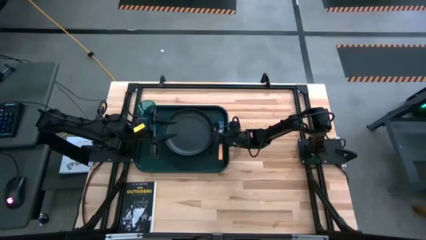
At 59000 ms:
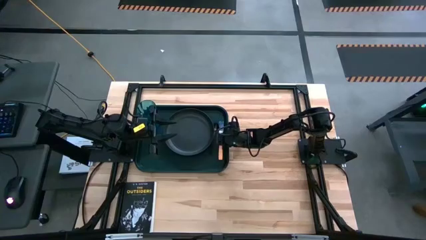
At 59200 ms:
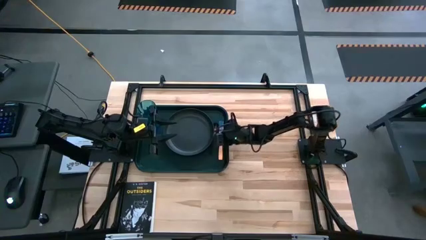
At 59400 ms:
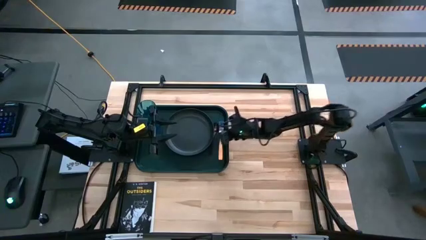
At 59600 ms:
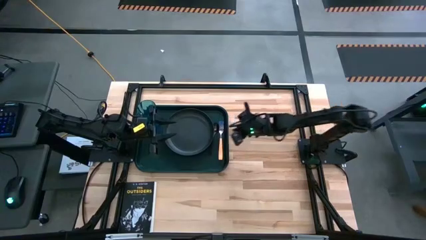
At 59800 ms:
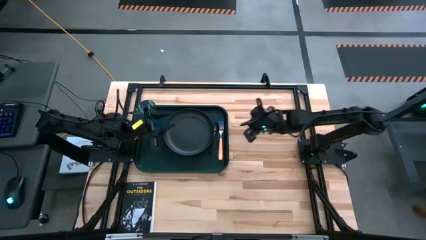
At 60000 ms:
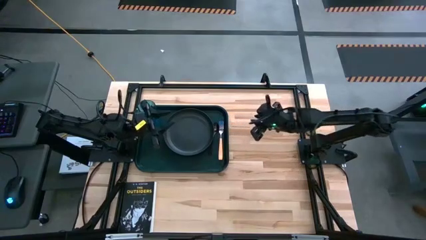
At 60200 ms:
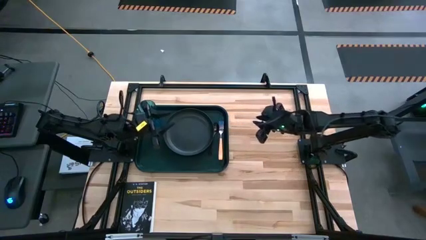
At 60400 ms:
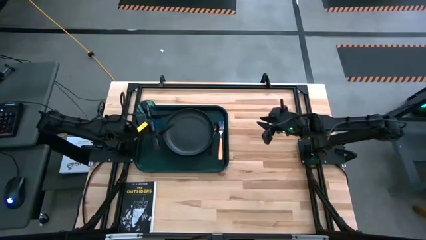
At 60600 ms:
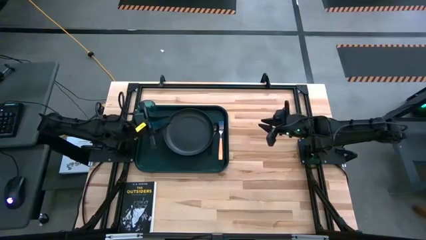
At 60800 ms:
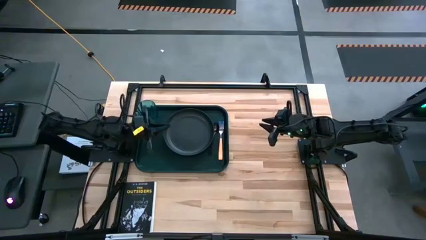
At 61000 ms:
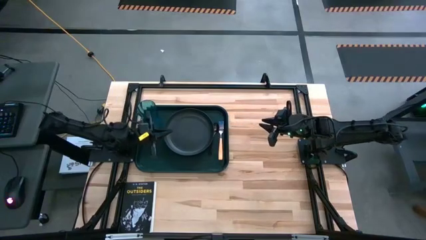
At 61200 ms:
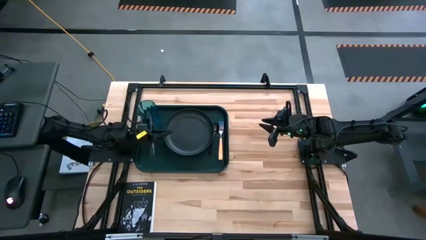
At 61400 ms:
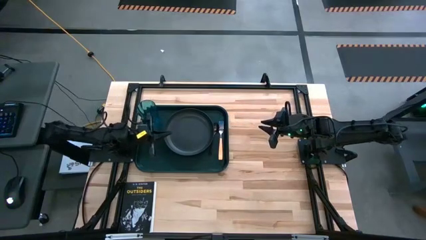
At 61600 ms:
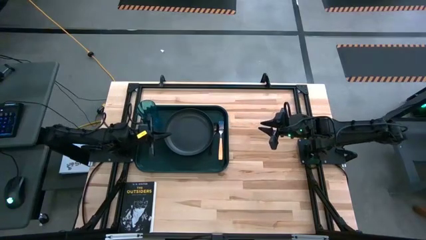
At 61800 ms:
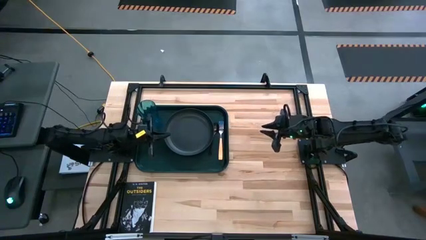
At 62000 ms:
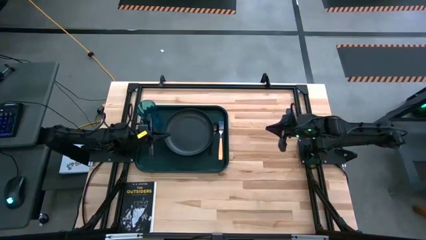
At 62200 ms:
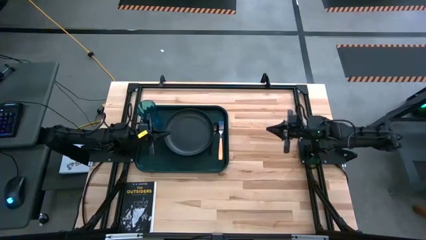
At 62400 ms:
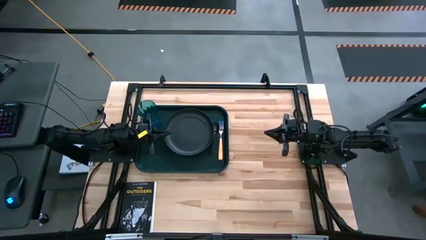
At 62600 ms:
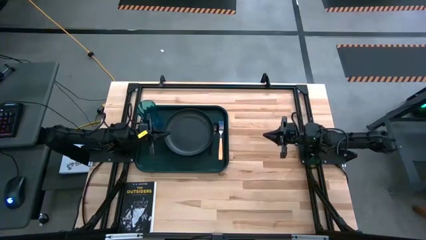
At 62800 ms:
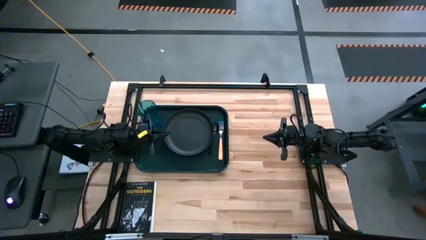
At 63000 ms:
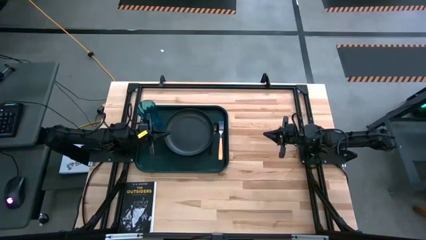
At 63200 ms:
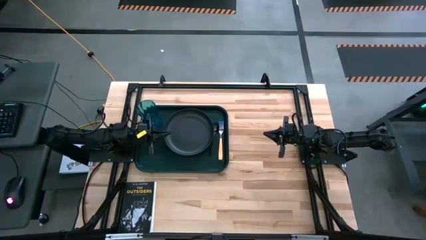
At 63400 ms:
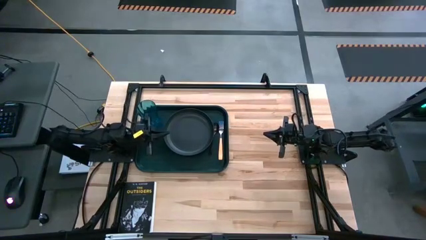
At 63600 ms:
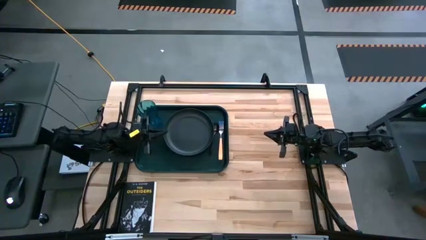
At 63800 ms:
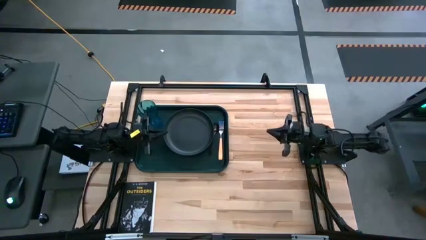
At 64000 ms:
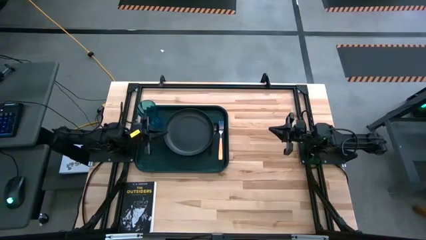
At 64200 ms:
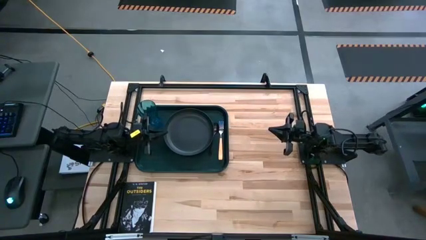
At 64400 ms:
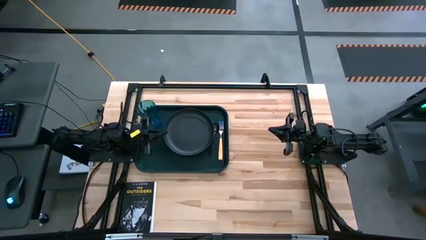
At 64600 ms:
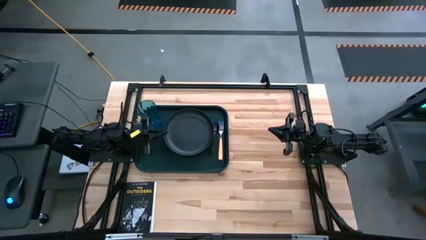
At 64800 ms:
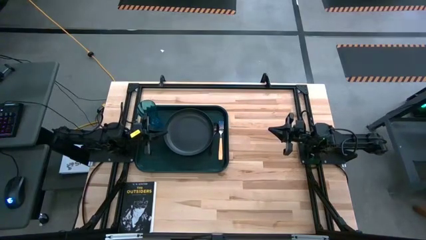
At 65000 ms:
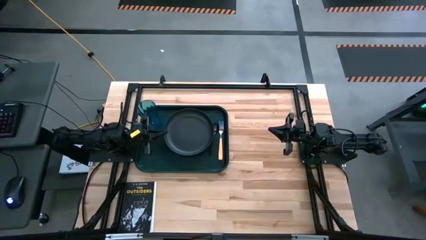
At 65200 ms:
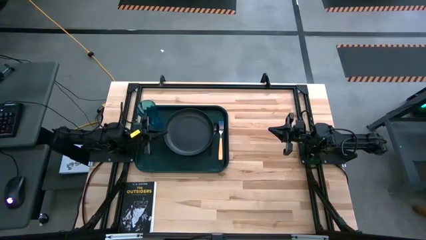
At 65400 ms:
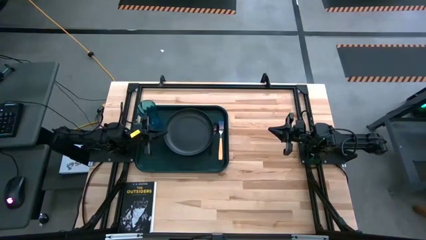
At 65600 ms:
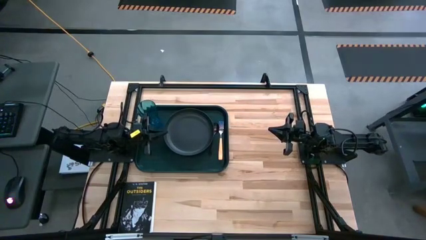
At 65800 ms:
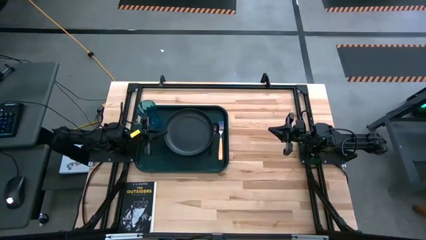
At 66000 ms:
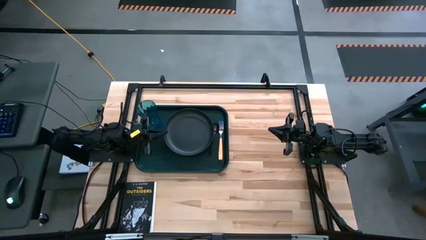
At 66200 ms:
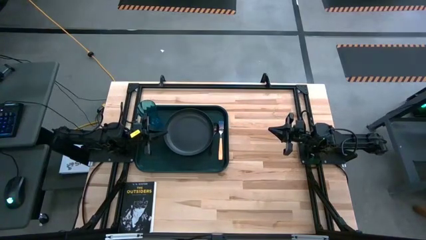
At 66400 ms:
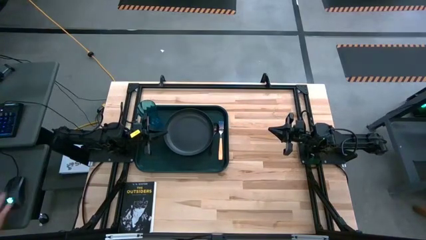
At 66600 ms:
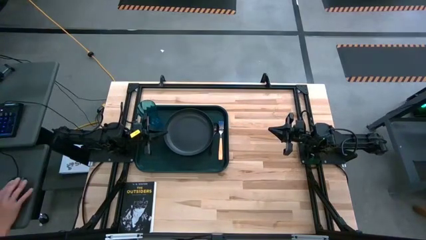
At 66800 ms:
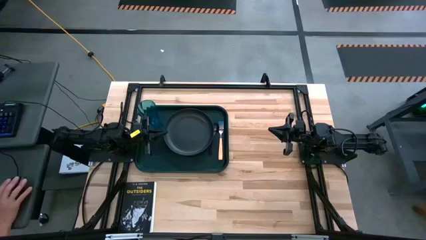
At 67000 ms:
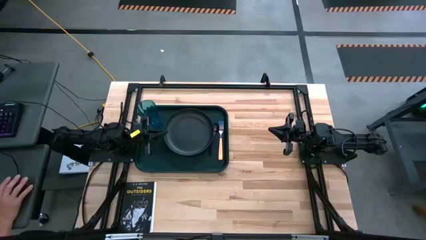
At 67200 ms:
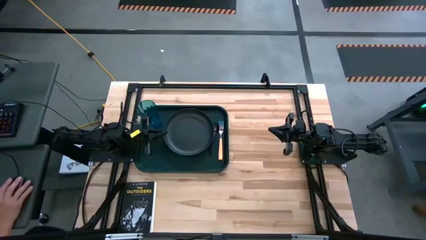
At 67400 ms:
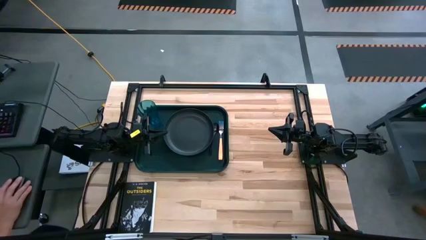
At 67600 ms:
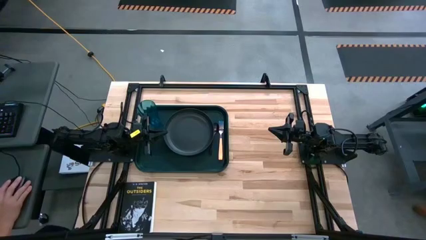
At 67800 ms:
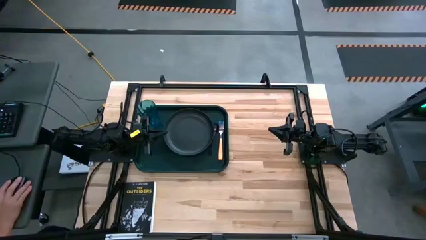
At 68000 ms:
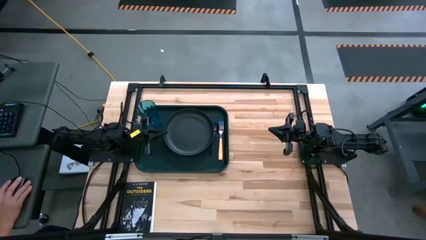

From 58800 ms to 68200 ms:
Task: Pick and place plate/cup/fork/spoon on tray
Return to Home Position

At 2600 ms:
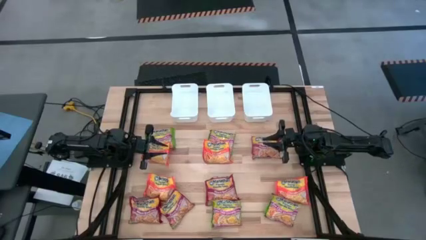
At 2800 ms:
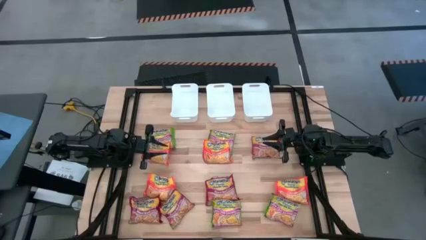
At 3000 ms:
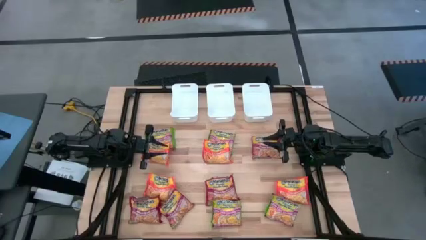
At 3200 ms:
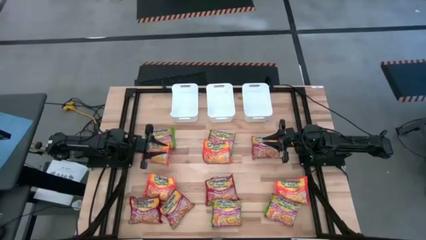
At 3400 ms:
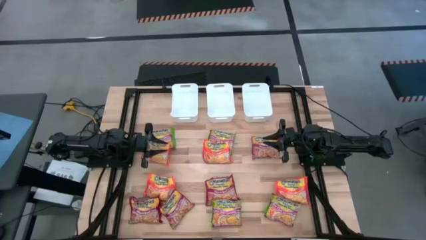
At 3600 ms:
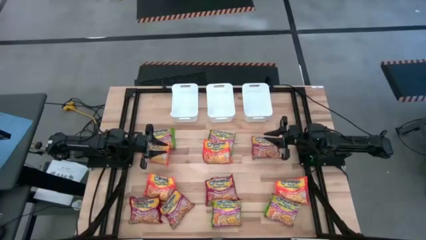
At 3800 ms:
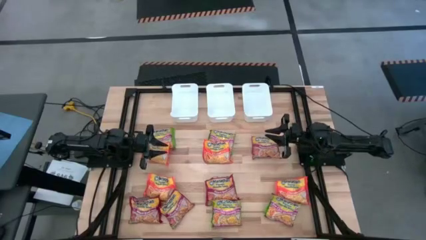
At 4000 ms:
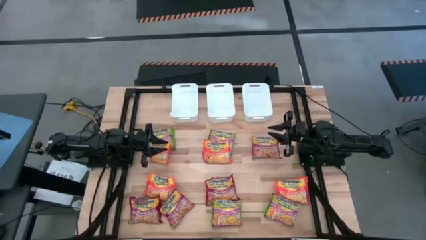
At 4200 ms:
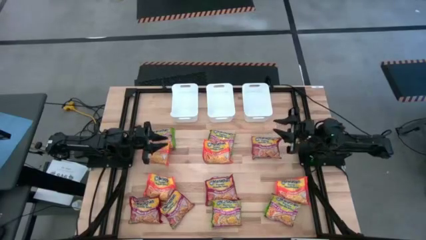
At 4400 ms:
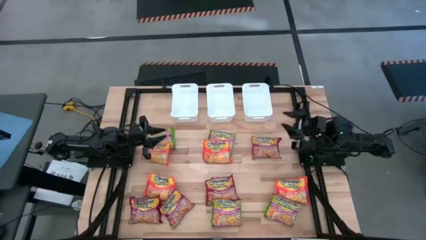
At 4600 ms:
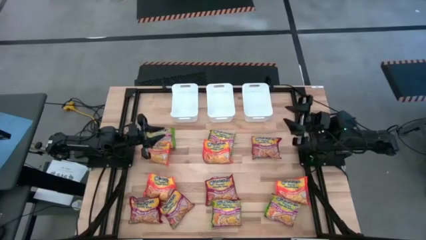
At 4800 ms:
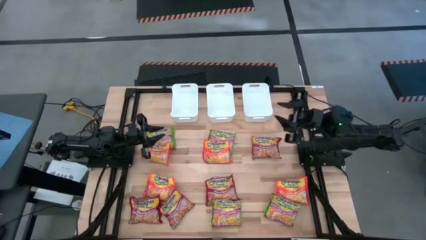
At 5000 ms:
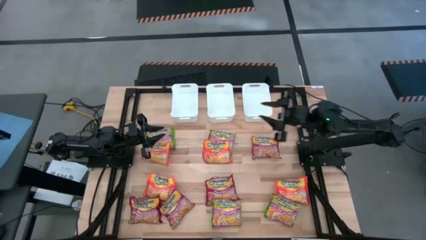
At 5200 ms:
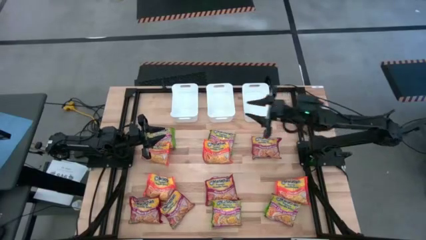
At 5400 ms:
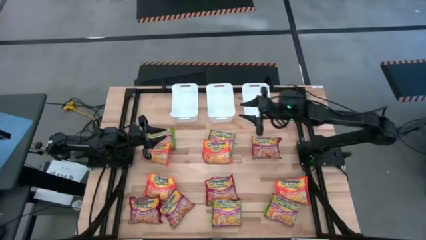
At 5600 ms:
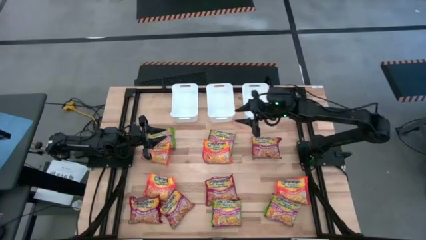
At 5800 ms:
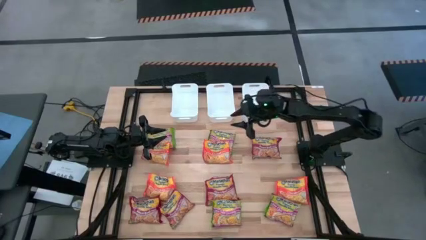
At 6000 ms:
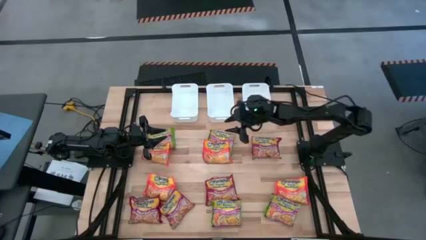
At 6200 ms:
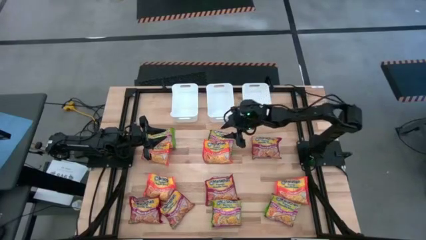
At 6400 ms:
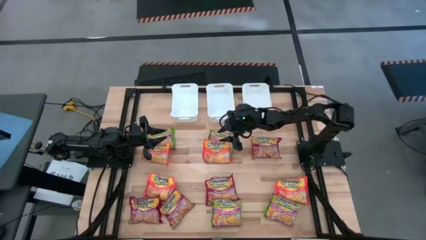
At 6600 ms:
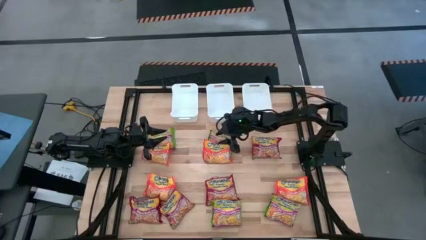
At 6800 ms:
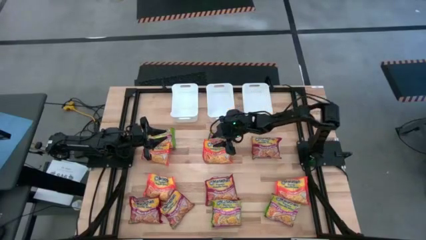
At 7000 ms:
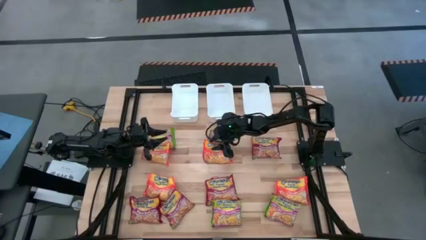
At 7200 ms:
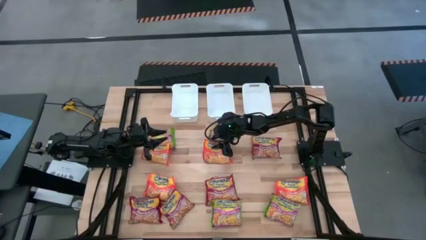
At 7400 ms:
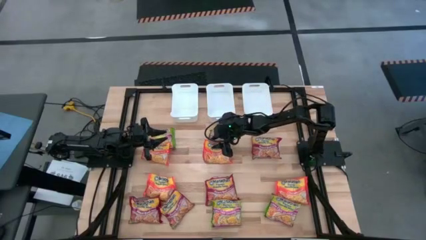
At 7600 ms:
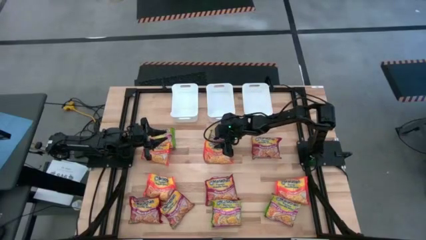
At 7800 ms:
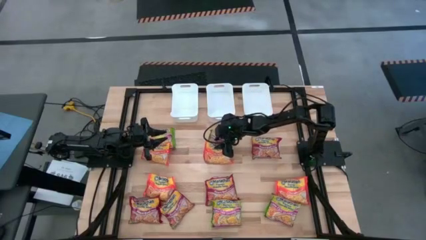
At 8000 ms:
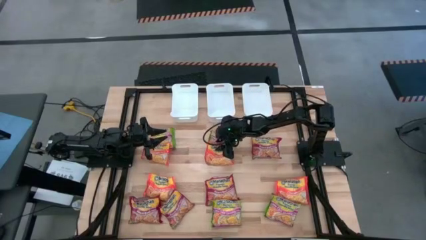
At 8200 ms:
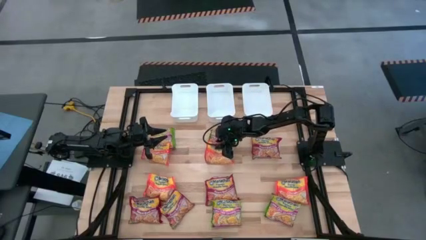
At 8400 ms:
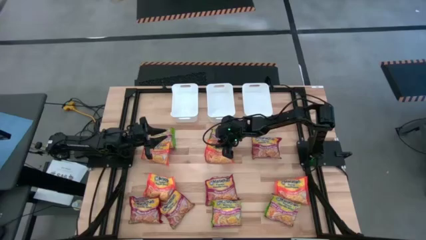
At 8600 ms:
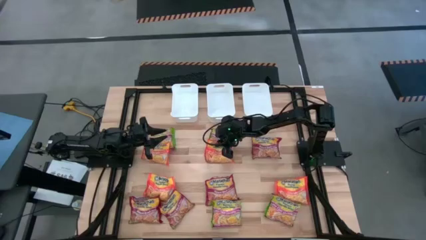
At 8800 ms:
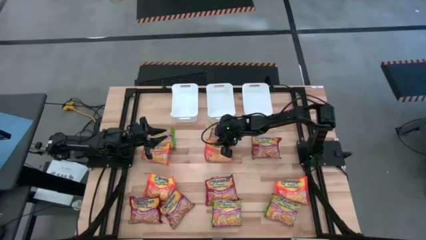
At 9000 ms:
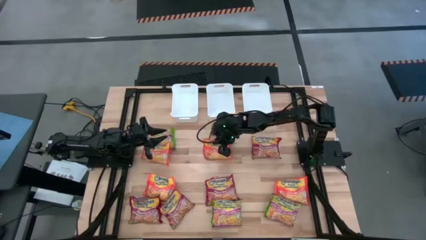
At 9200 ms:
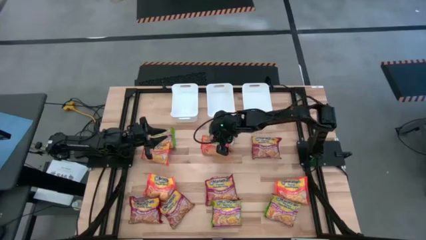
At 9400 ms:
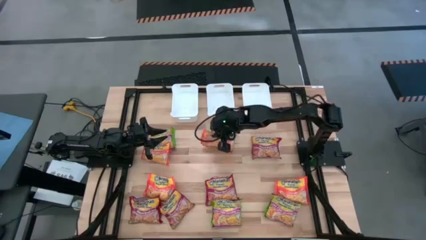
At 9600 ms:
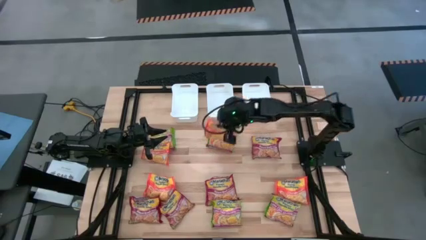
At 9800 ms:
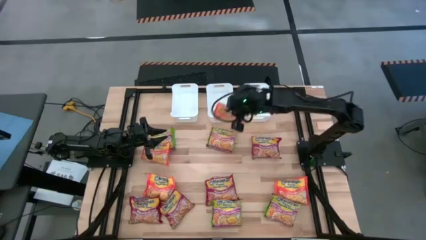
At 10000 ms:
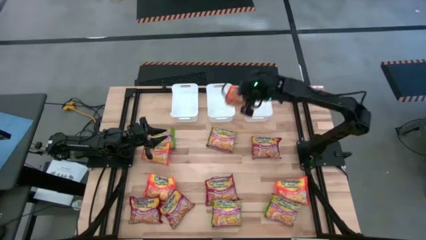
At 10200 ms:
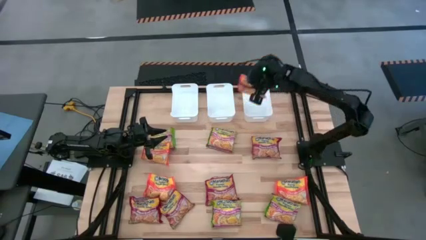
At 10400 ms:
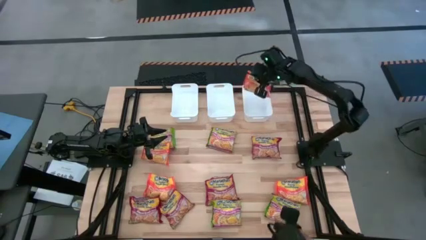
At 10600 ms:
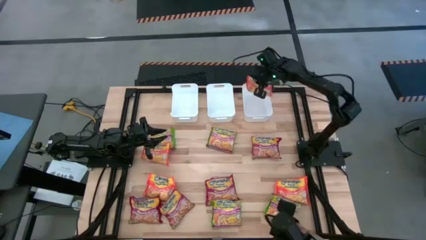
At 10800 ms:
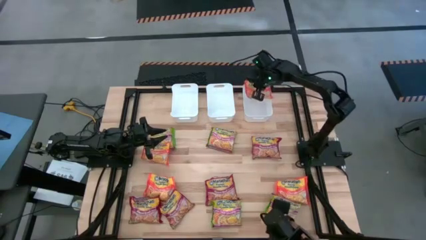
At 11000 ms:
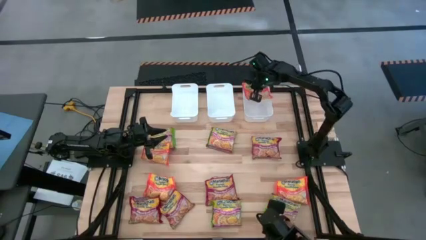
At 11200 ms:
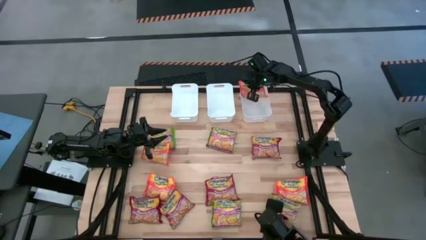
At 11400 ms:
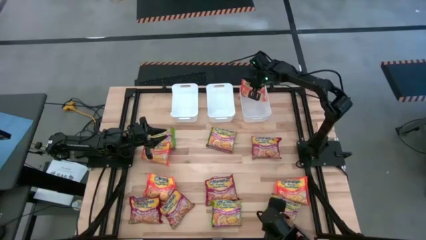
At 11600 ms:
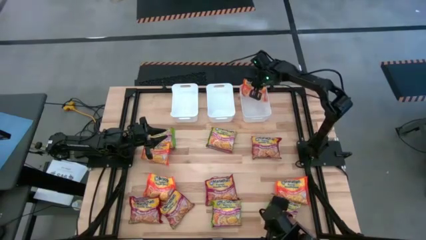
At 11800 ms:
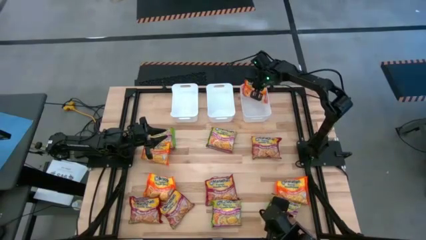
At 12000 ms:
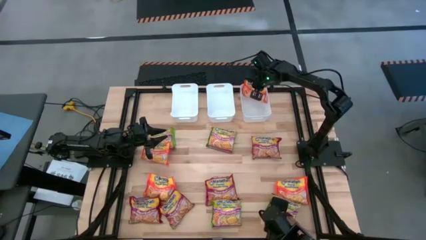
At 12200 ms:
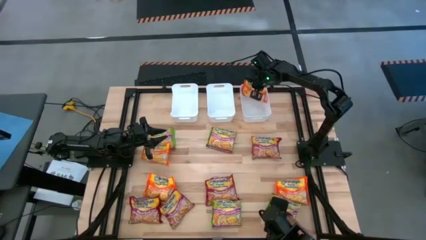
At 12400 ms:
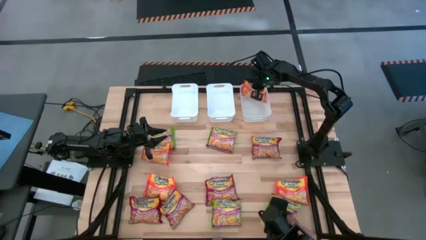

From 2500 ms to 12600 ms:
Task: Sort Maruchan noodles
Put the orange noodle pack into the right white bin
